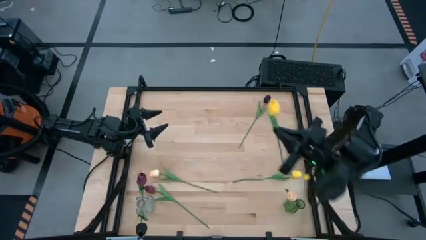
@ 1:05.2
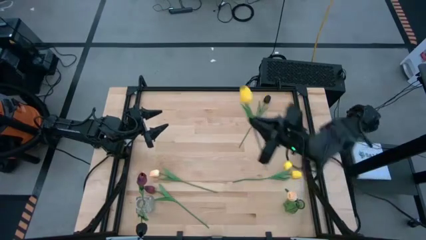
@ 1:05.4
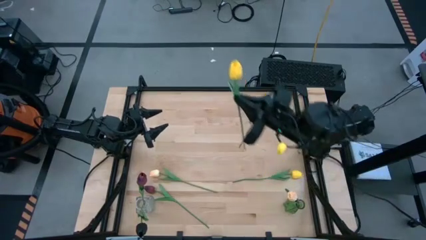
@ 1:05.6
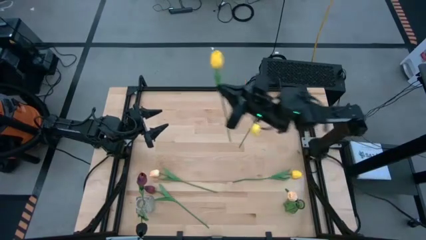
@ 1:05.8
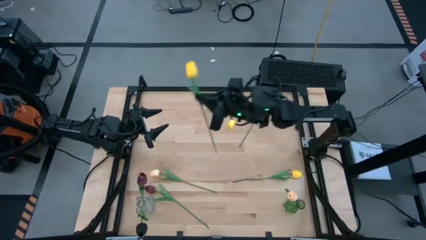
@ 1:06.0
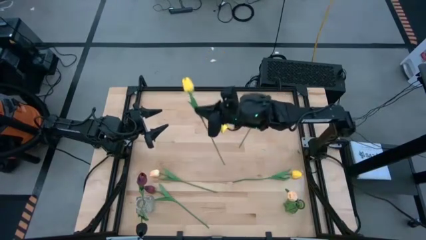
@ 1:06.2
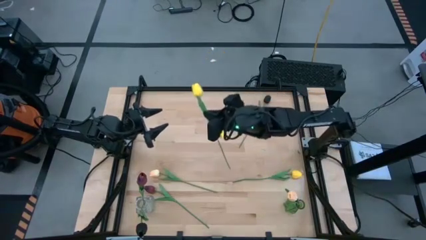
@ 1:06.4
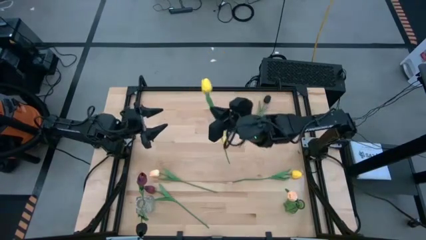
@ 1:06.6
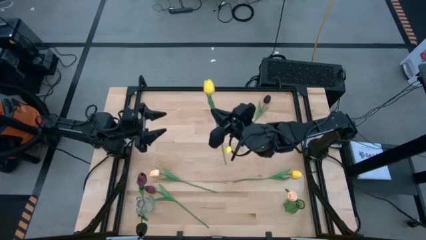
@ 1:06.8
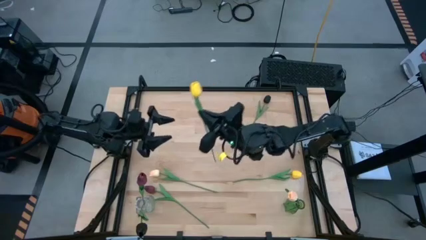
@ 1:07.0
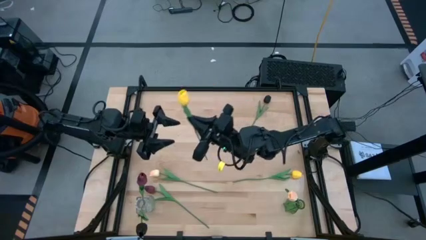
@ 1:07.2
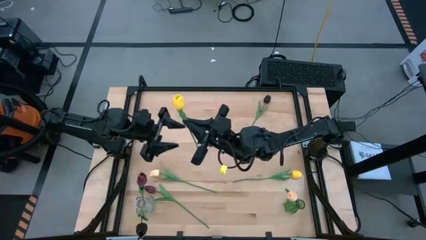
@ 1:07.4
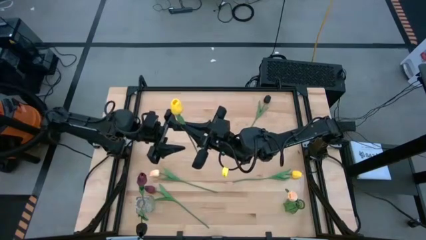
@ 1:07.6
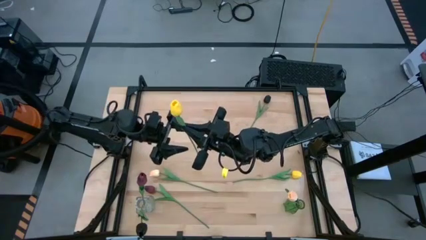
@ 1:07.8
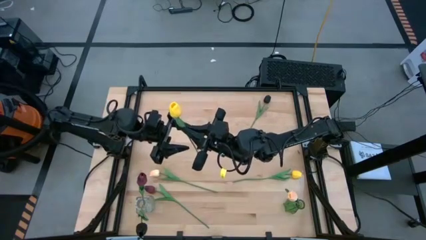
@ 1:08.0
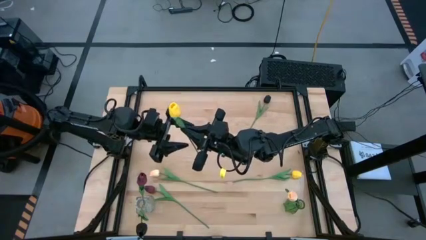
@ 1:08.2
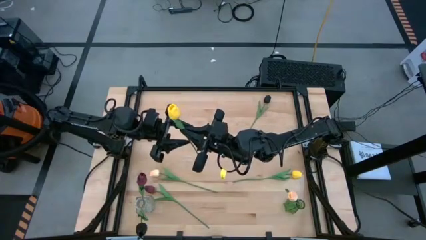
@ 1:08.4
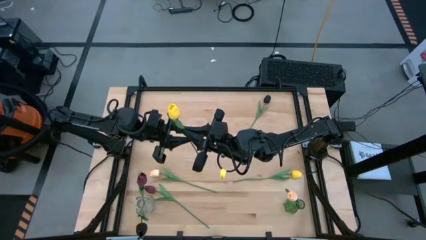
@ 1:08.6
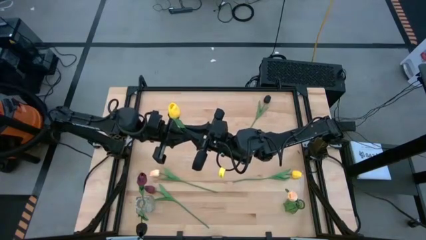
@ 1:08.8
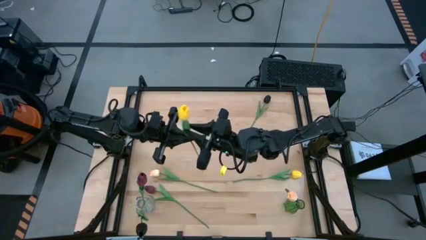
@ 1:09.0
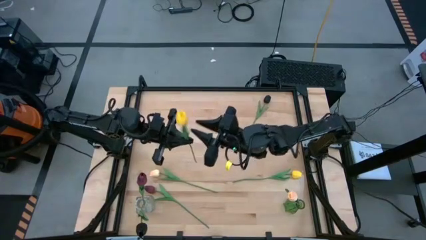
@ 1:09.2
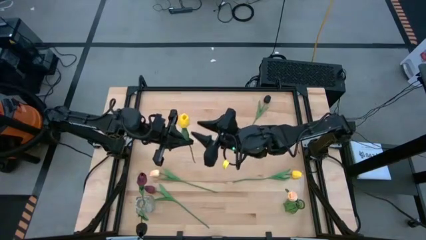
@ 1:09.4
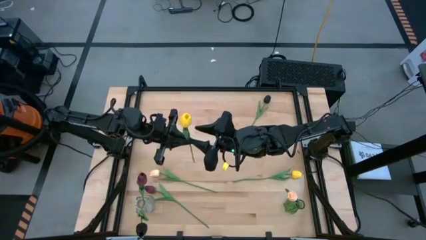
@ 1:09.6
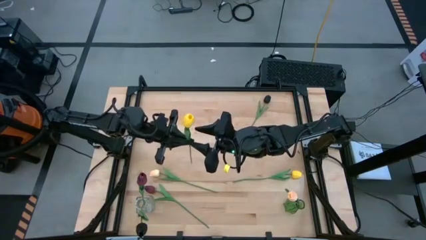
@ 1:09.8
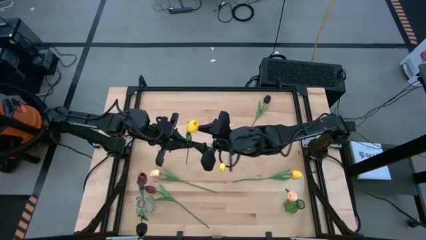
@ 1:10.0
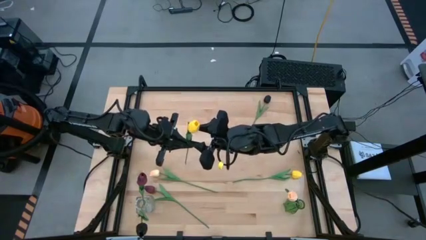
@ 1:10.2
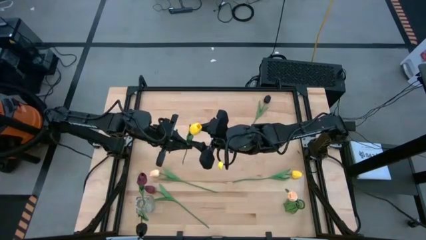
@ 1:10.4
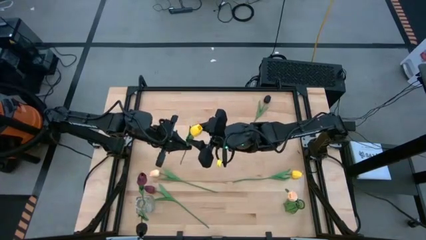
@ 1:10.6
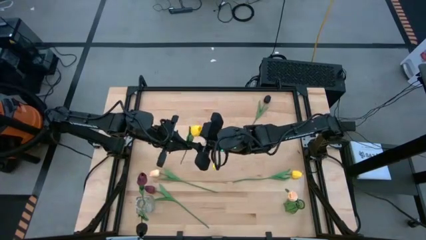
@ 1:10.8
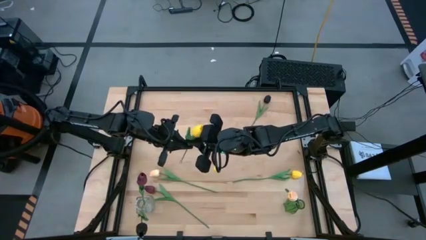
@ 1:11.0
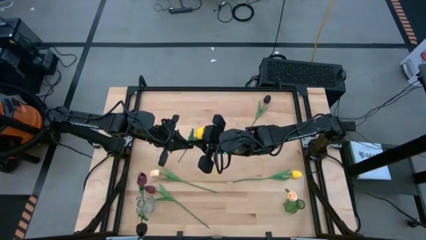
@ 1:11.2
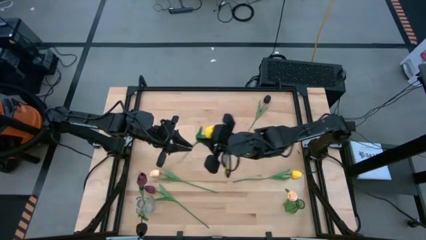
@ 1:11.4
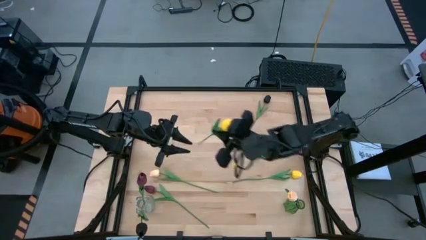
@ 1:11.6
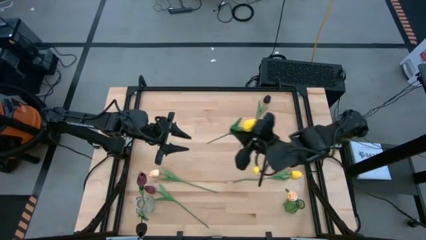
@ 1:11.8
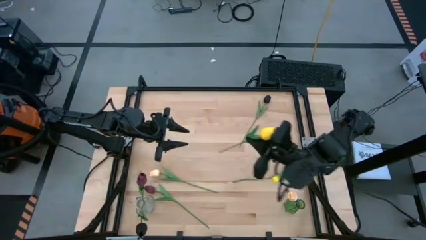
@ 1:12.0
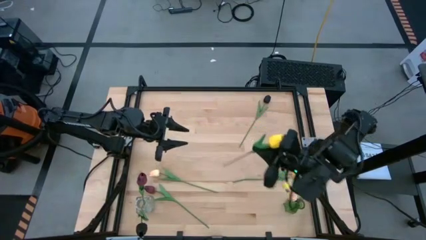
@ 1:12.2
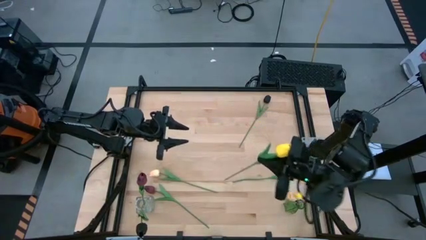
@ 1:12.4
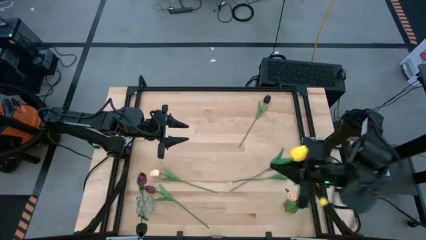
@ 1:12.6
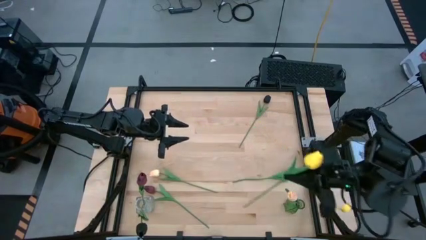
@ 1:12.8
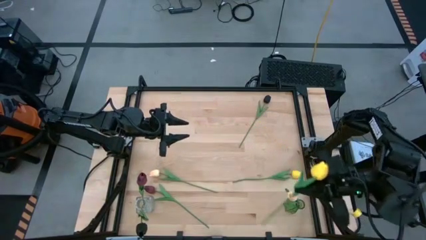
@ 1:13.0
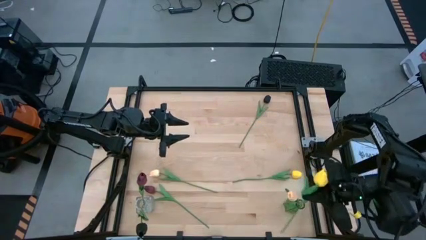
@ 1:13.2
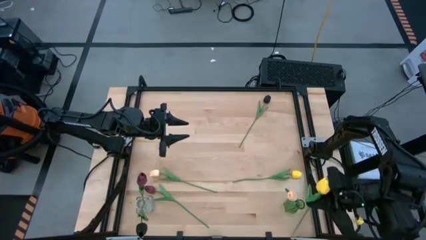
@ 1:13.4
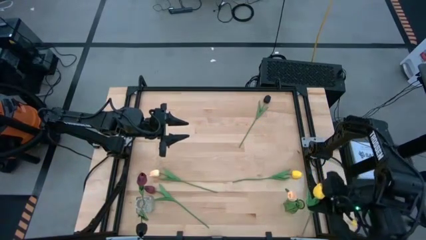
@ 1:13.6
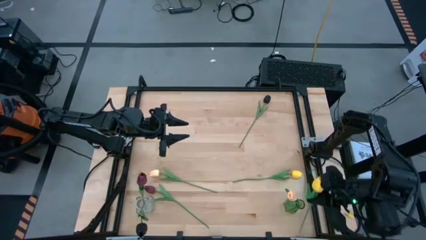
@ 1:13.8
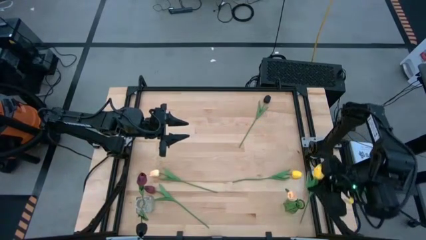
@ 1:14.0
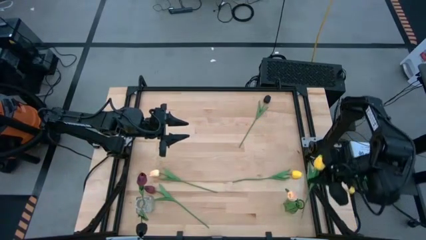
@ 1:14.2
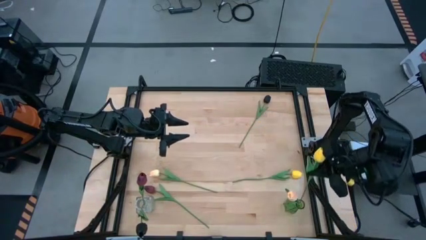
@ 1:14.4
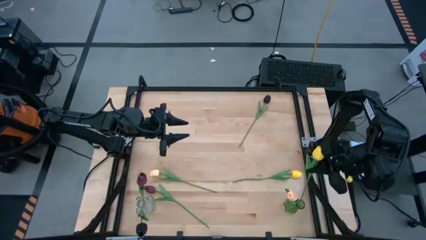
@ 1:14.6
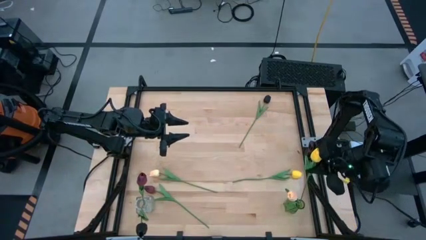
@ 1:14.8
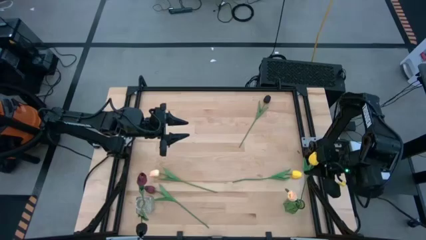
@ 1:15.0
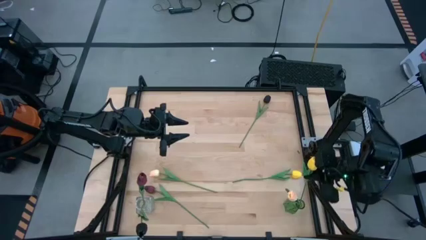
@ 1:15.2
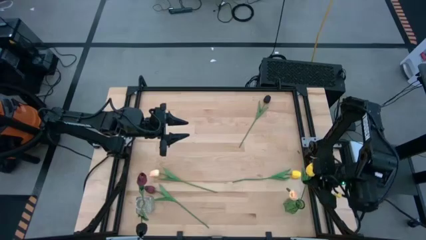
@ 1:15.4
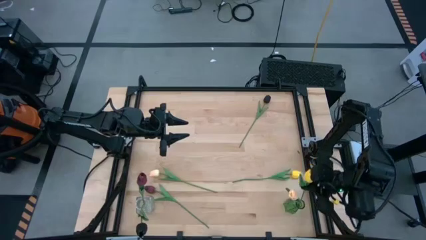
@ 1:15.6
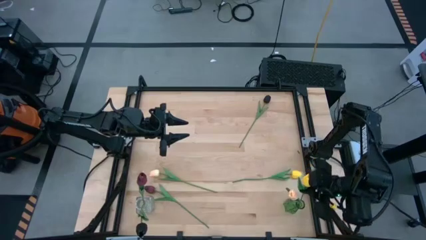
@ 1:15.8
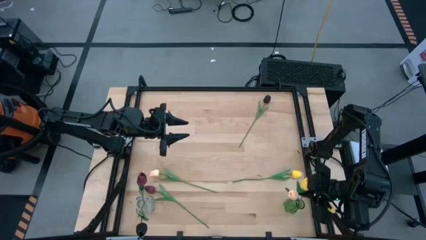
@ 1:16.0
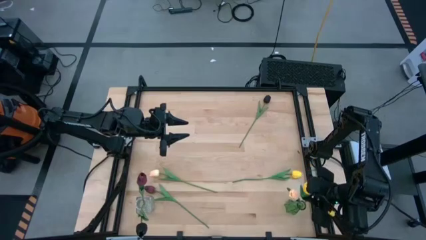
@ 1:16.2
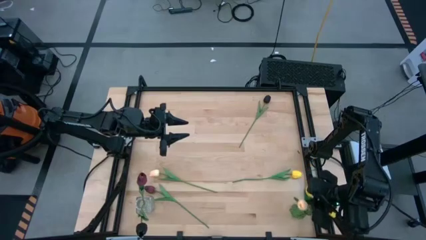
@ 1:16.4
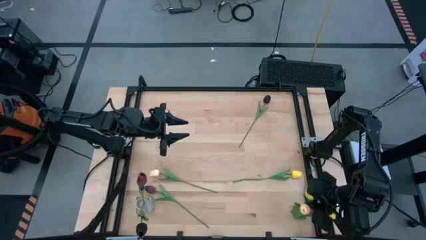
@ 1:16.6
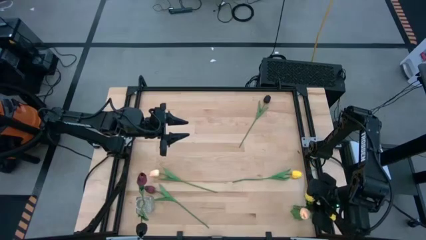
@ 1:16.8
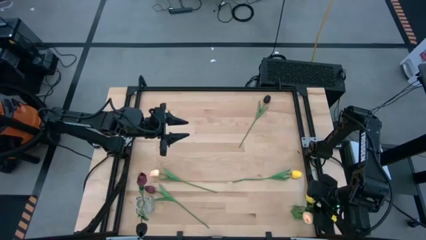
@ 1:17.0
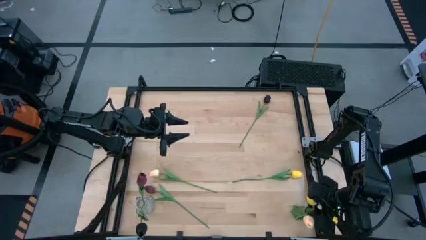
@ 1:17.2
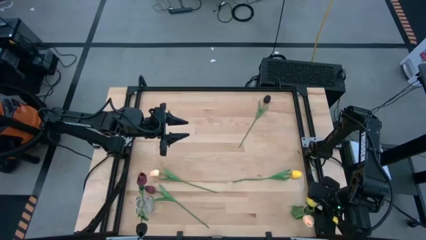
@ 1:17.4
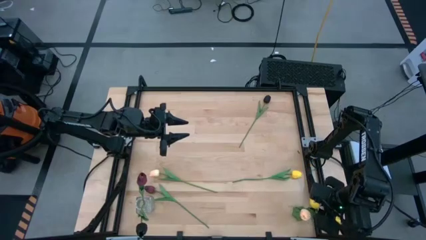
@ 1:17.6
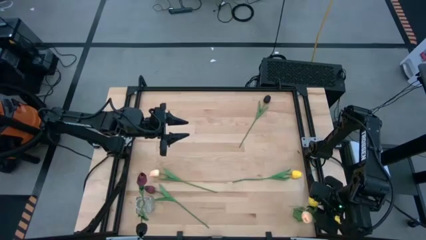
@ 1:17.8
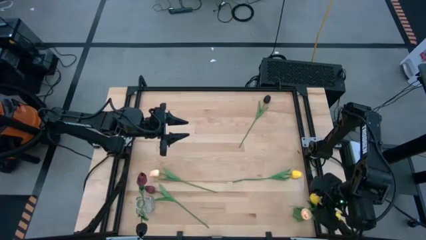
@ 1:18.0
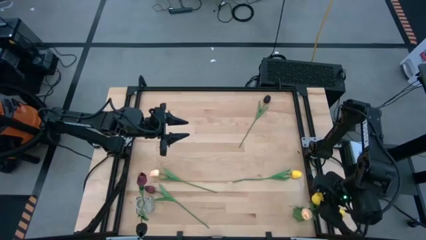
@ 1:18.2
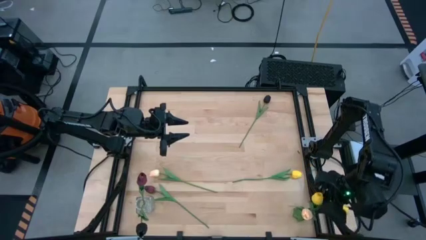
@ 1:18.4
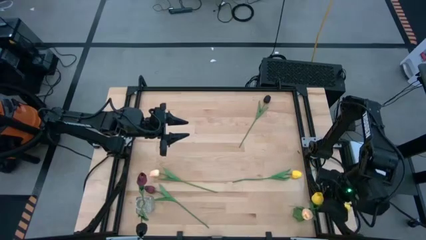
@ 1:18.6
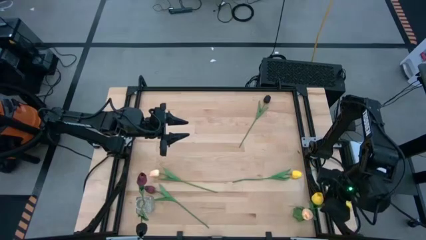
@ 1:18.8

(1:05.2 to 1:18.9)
Task: Sort flowers into vase by color
Put the top yellow tulip into the green vase

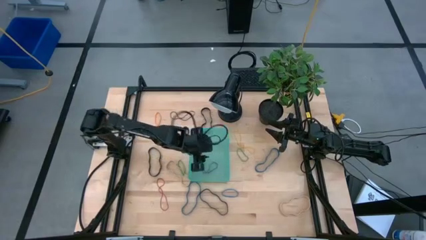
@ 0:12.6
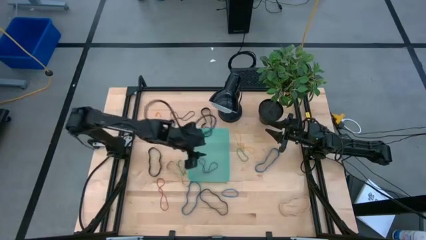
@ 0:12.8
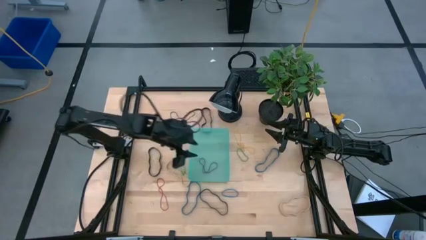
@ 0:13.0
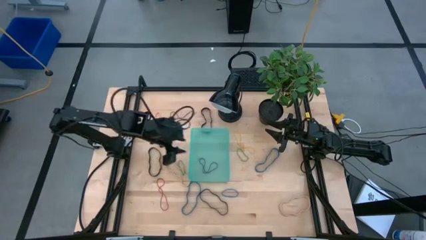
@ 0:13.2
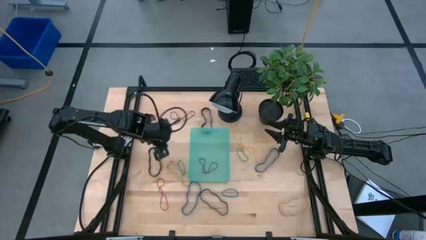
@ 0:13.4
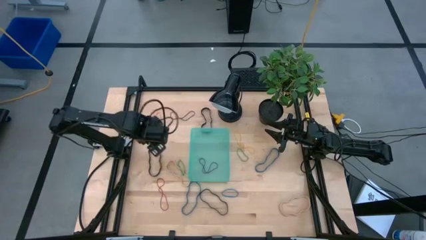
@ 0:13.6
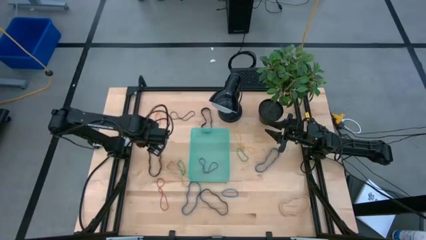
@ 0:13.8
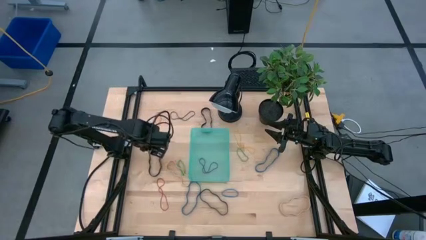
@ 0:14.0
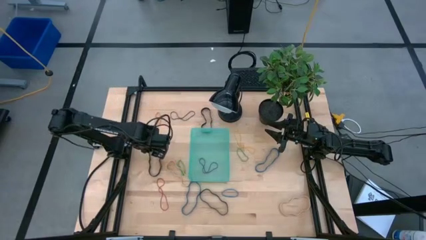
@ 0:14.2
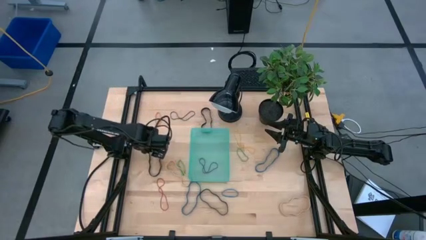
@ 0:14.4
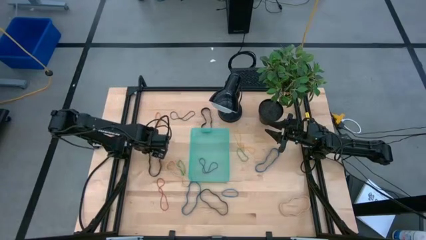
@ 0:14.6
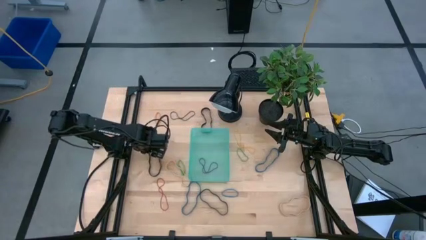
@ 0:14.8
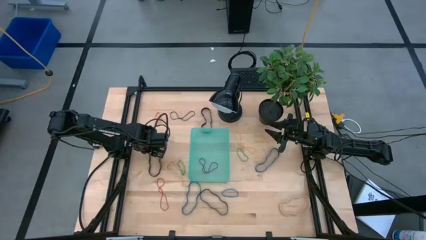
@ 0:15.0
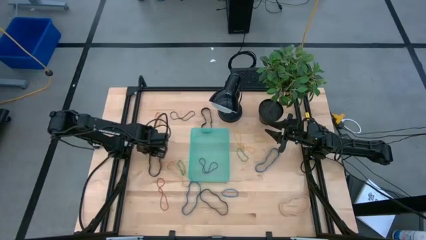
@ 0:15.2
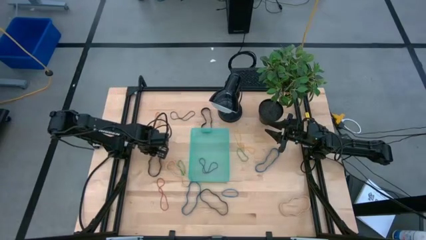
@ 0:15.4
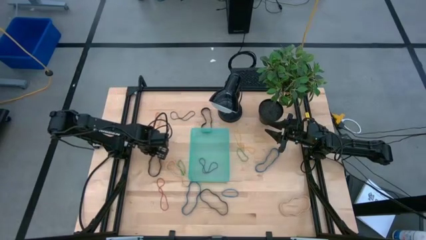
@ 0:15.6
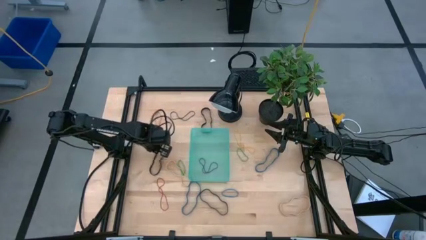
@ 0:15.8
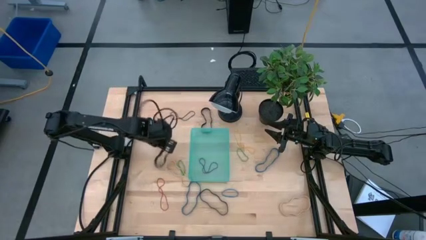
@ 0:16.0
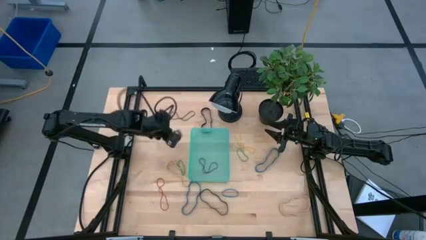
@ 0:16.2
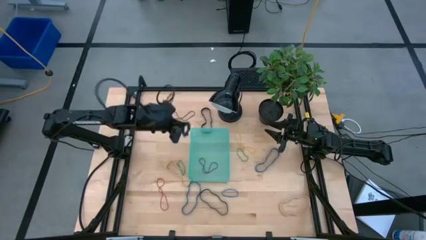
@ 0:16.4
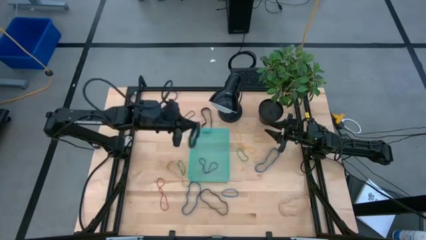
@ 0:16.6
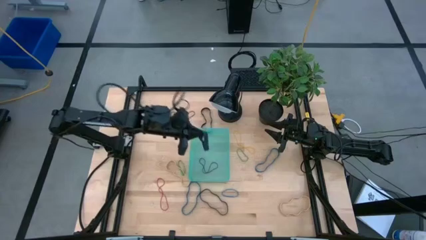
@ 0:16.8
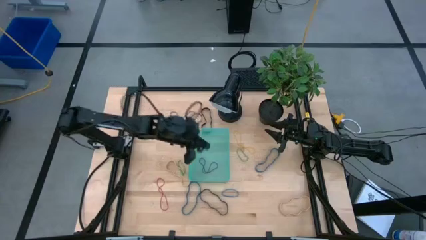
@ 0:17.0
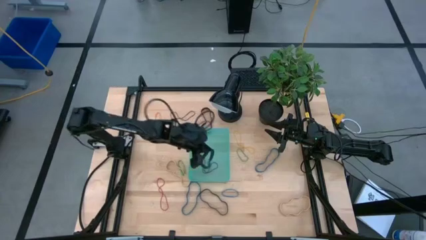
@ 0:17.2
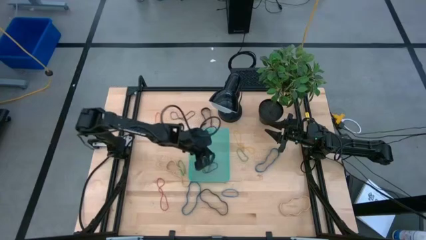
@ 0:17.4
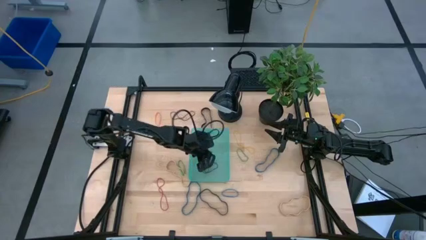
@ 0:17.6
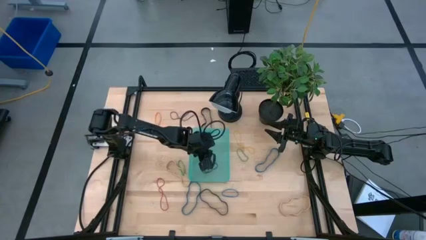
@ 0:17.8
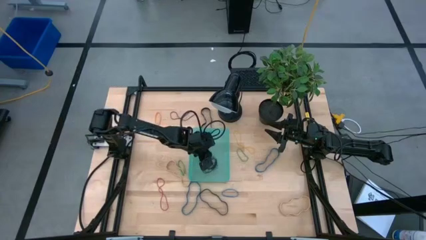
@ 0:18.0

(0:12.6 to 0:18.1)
Task: Pick and place rubber bands into bin
Put the middle black rubber band into the basket
